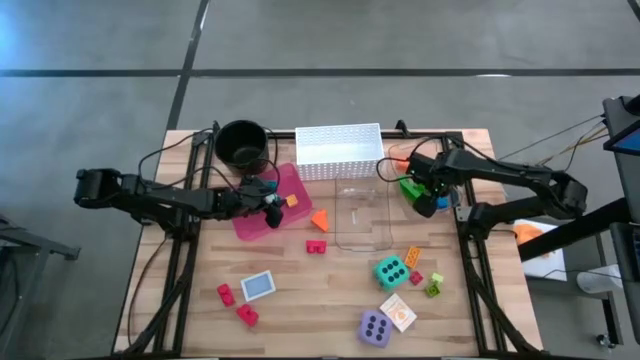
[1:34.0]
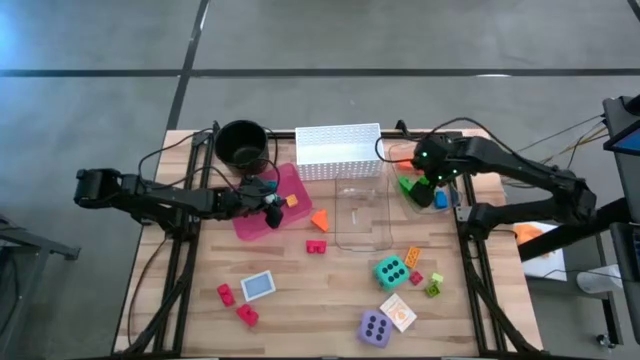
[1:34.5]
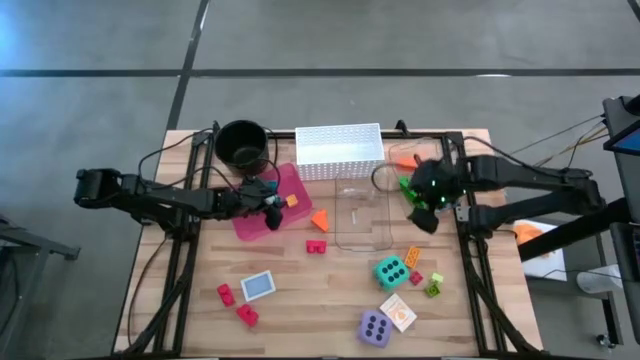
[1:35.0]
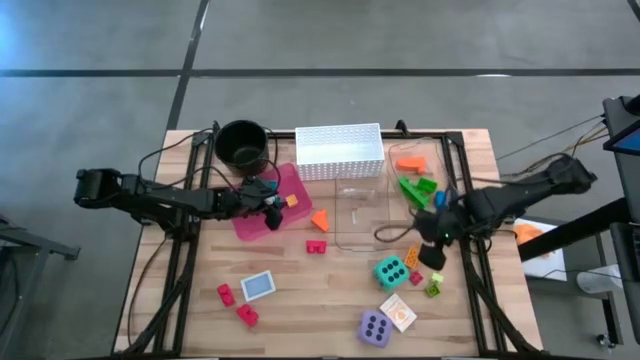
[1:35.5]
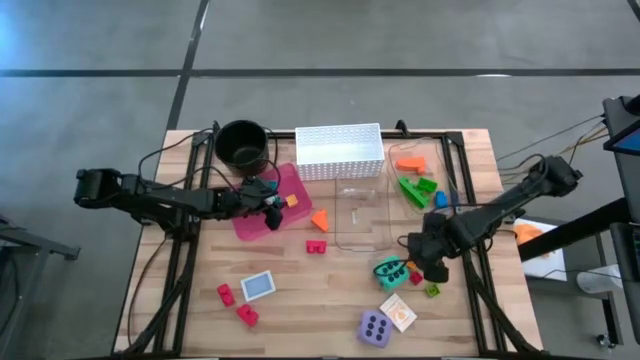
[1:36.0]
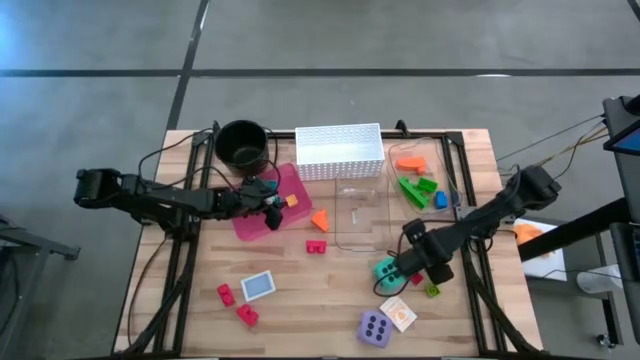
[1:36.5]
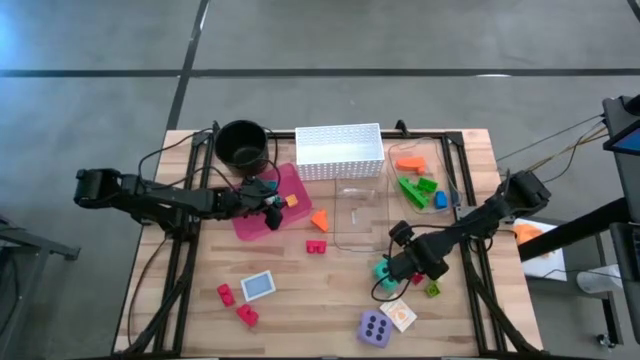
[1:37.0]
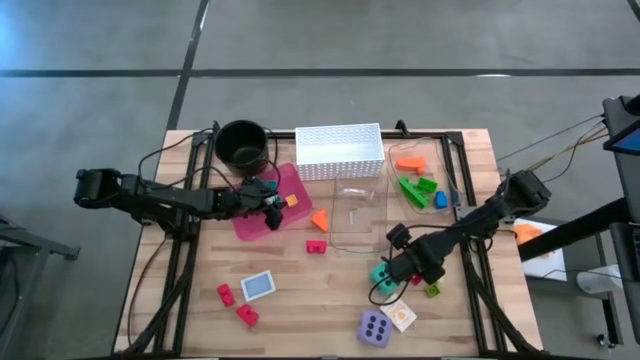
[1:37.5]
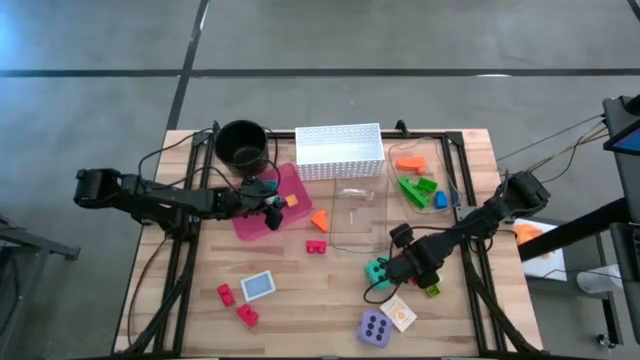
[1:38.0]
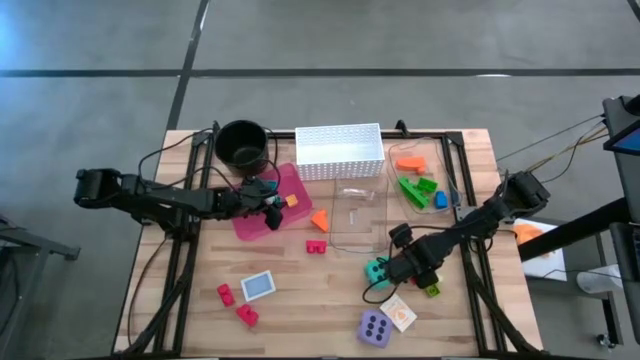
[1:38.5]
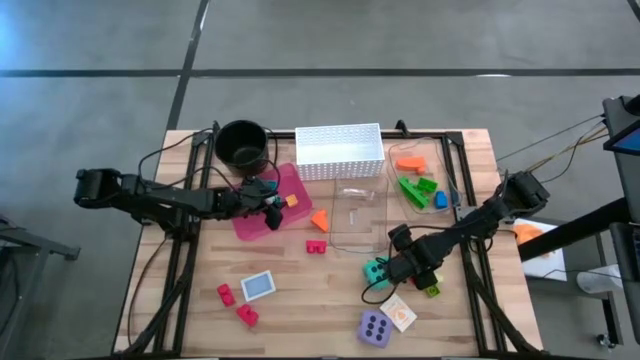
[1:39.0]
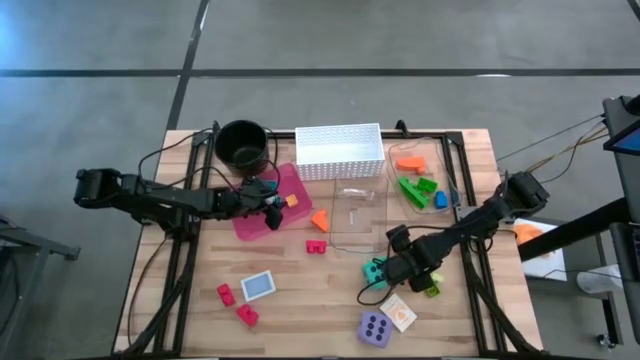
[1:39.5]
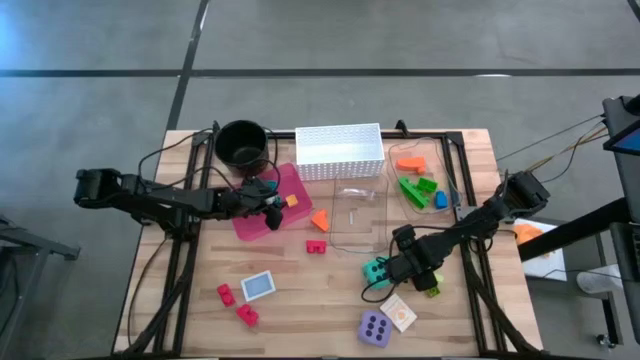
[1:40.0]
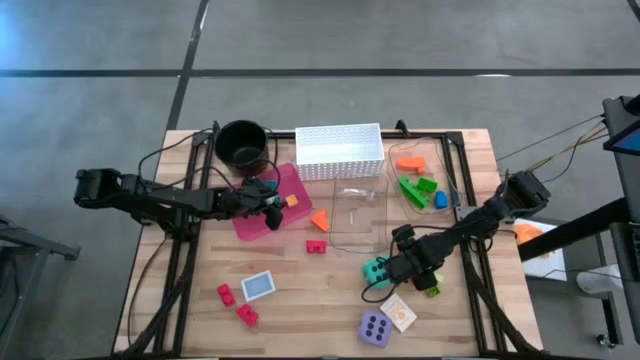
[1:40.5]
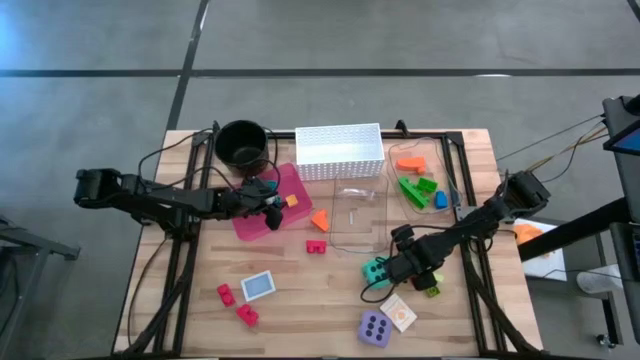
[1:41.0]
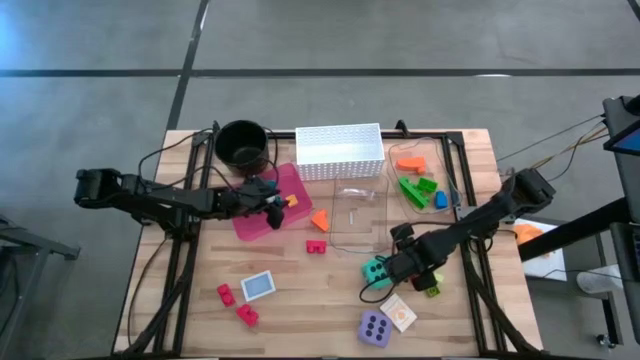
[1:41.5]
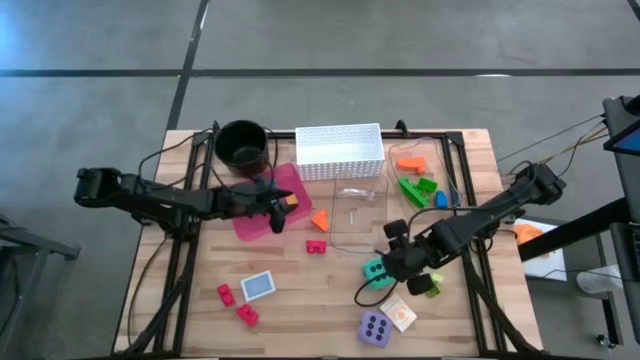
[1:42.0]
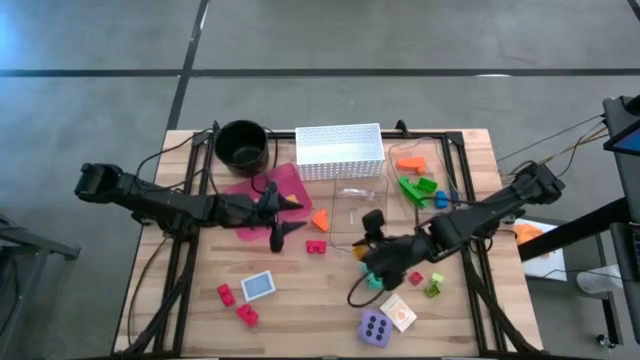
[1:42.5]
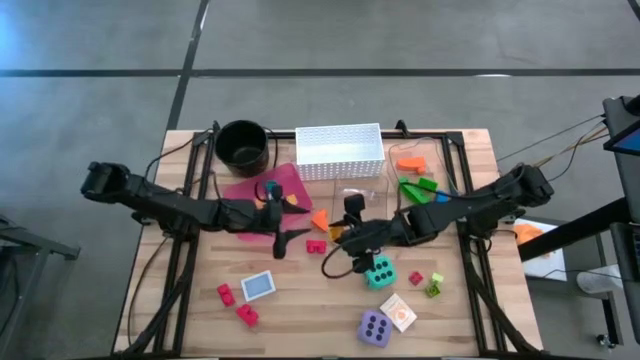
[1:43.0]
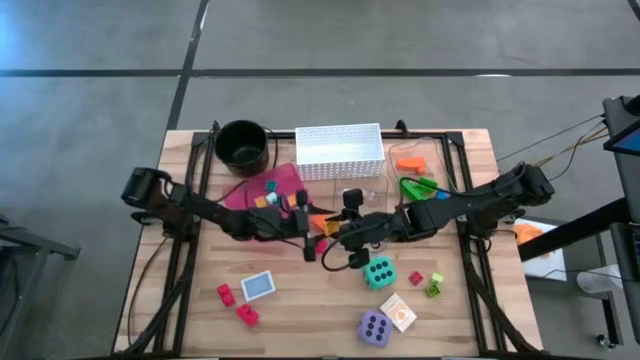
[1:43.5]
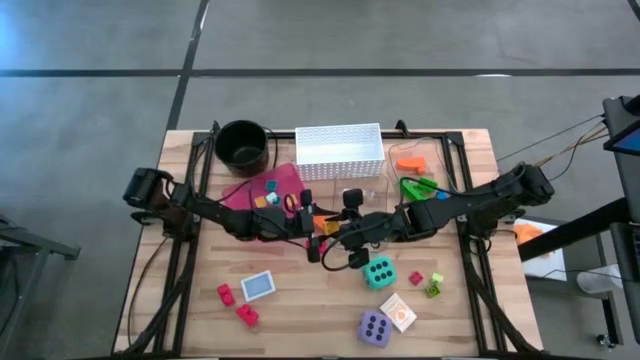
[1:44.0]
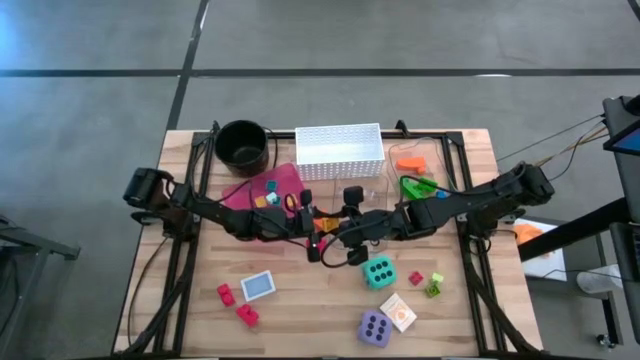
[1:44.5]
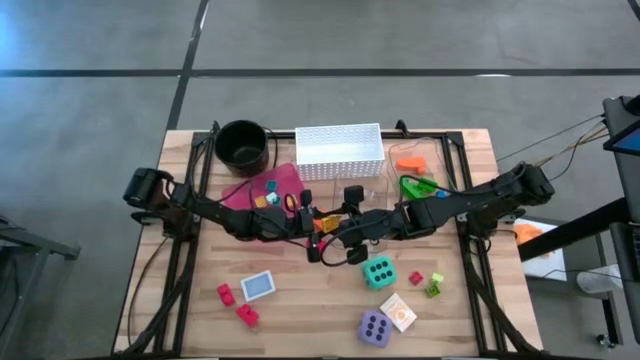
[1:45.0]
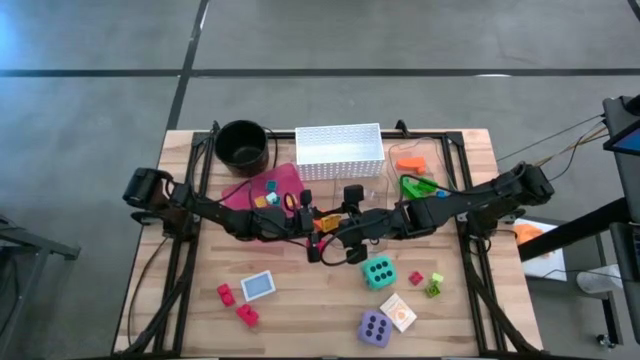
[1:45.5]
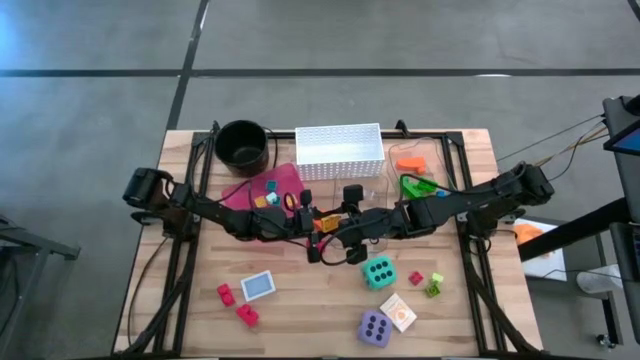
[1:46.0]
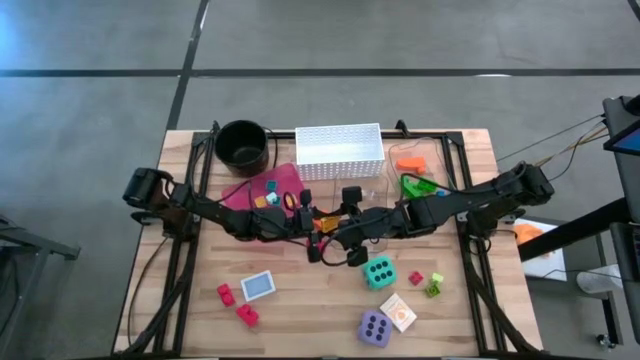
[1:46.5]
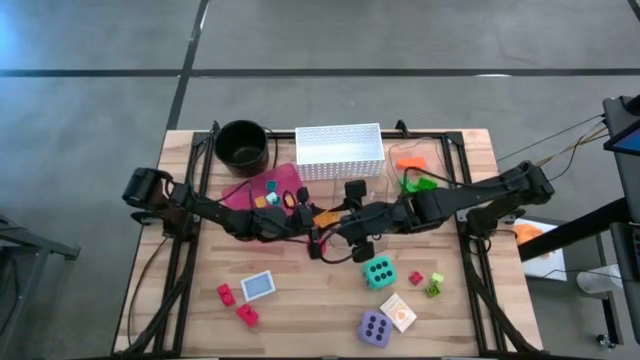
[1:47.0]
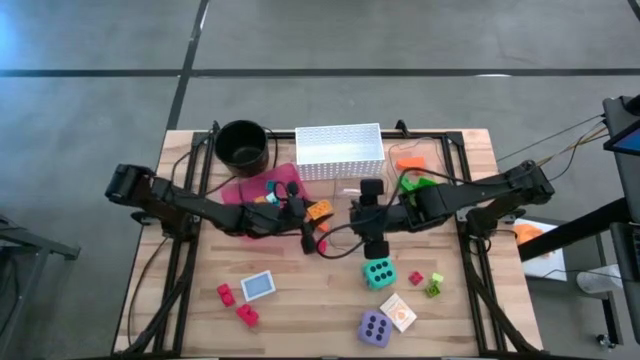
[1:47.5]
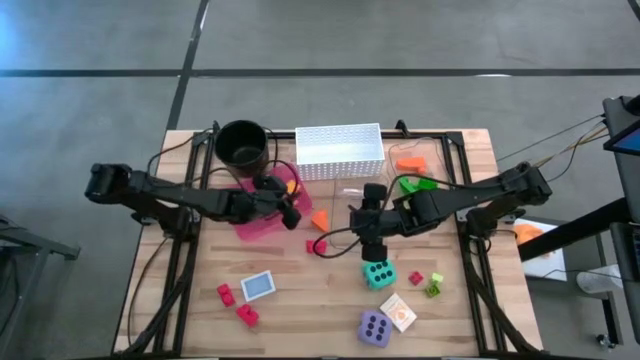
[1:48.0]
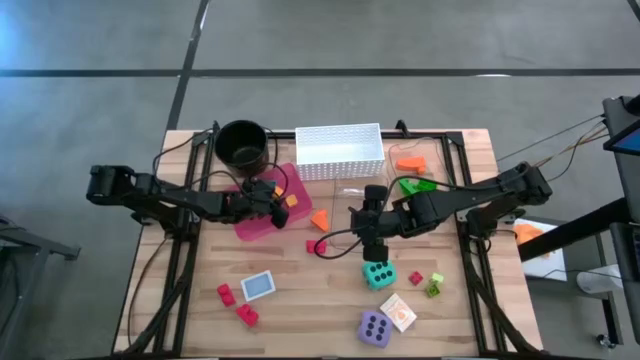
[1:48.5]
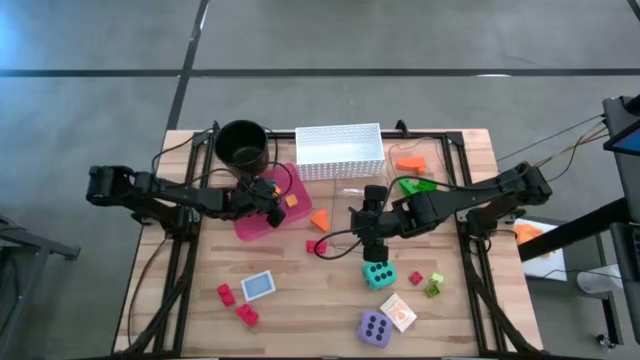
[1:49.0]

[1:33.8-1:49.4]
Task: Pick & Place Toys
Put the yellow game piece into the red bin

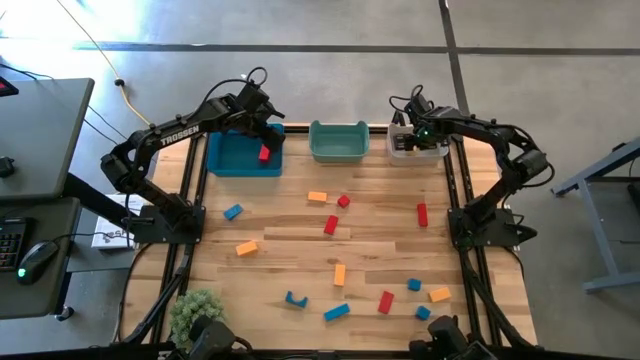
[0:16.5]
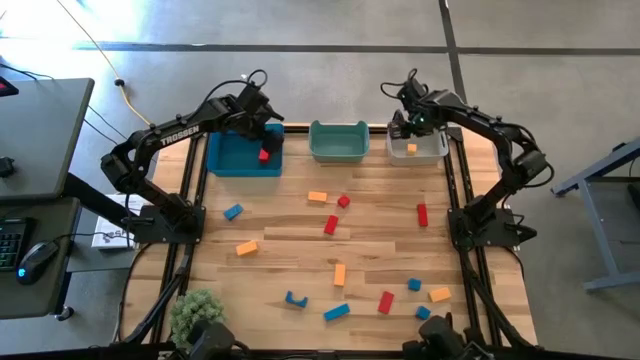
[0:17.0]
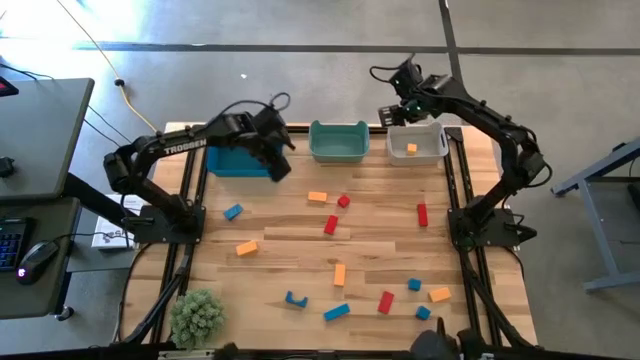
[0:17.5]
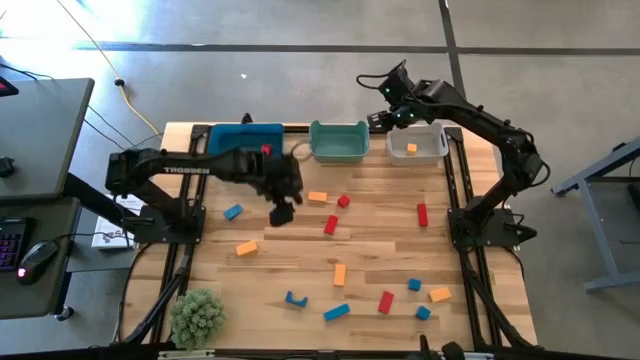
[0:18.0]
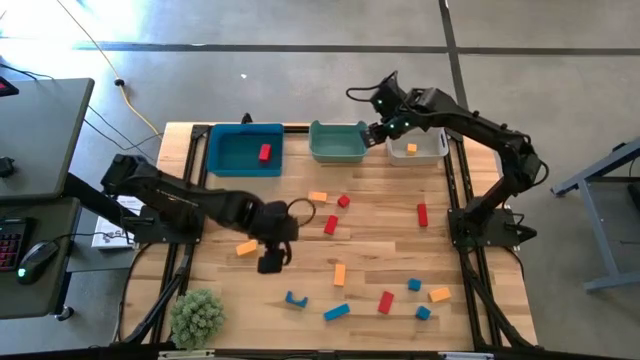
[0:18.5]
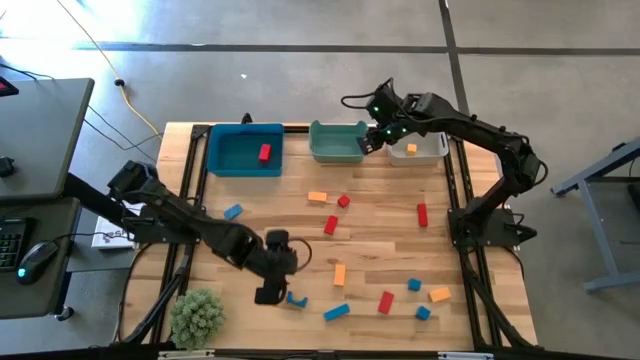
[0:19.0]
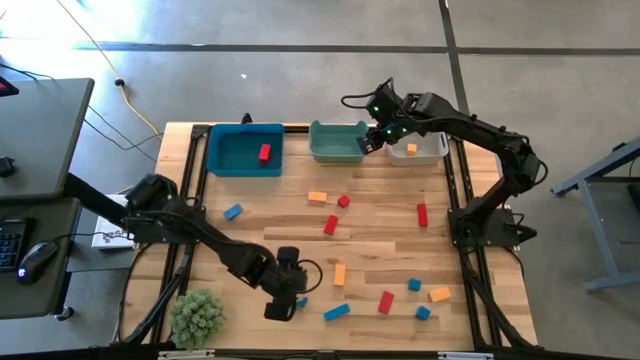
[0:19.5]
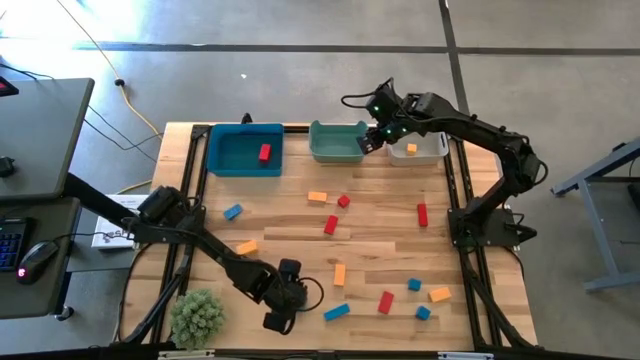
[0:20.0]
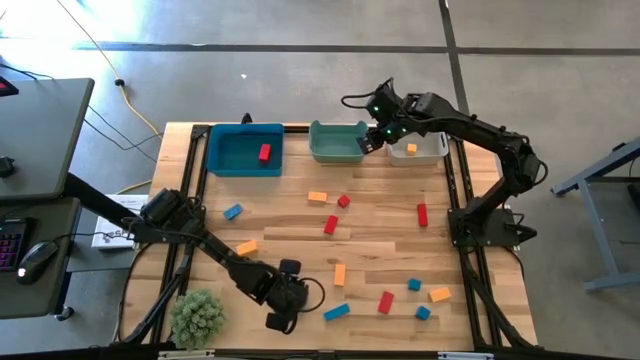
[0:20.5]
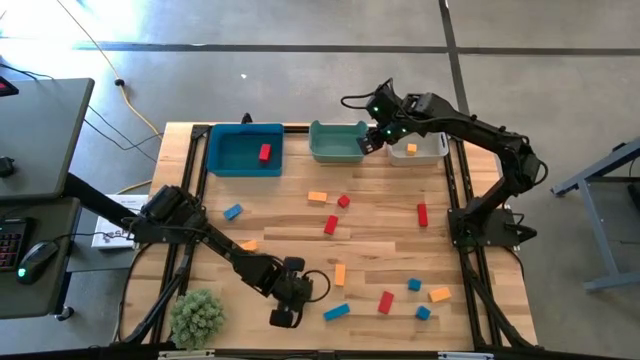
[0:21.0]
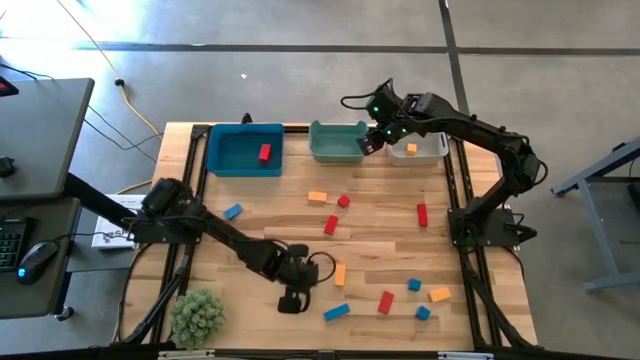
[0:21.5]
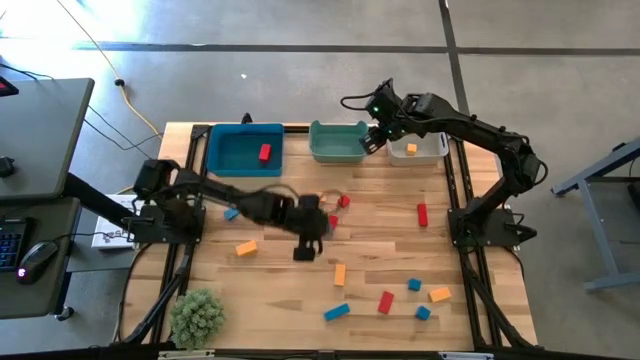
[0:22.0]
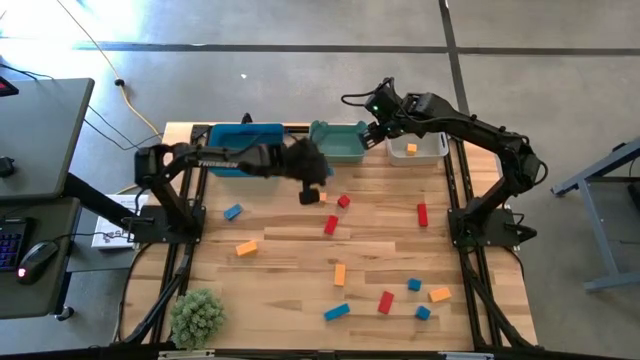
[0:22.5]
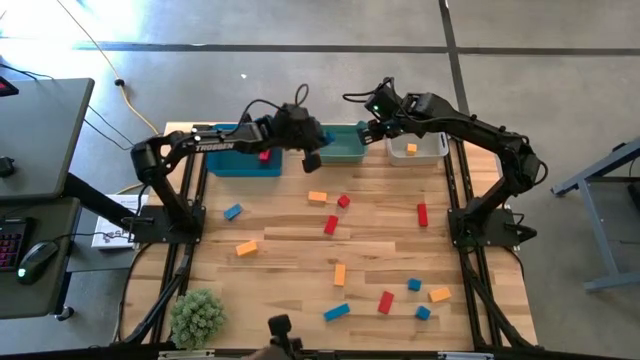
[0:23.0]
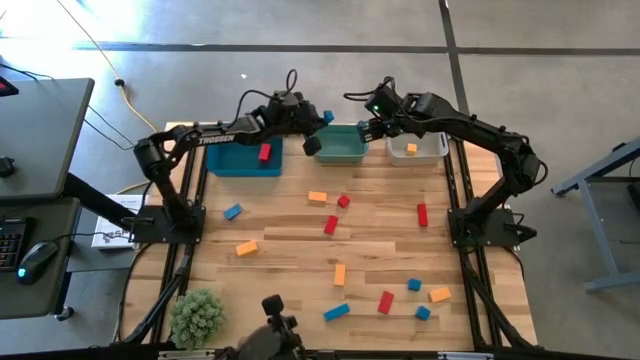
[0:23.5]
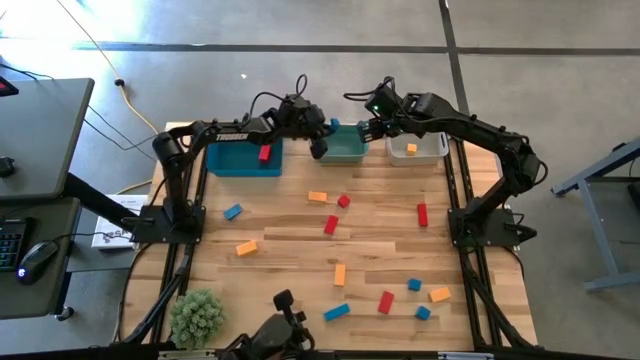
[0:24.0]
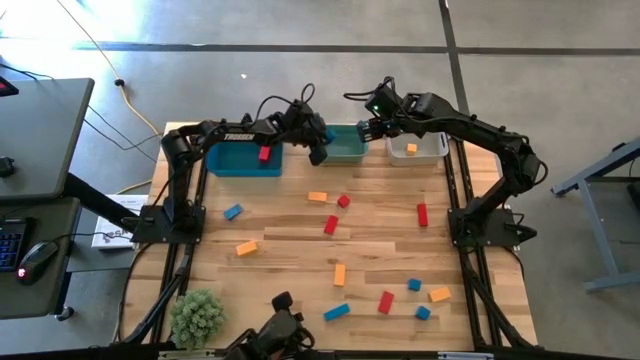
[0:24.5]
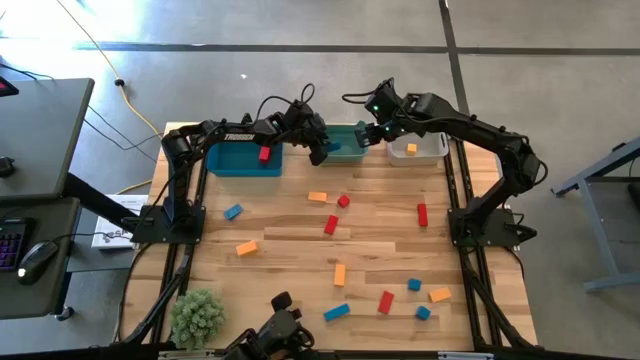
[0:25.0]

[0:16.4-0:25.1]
Task: Sort & place blocks by color
Put the blue block into the green bin
